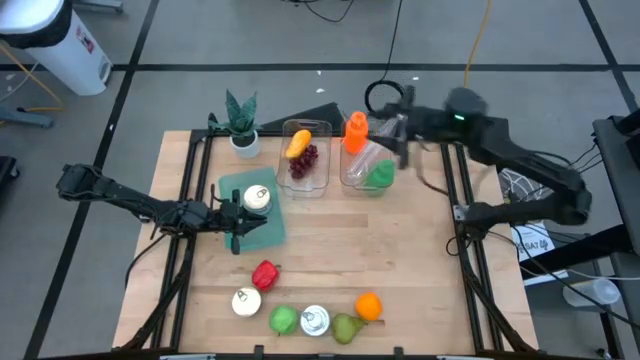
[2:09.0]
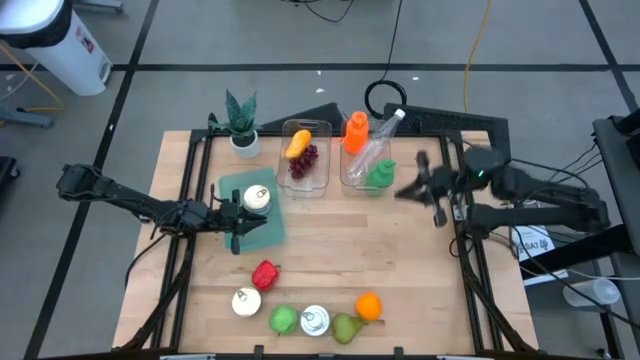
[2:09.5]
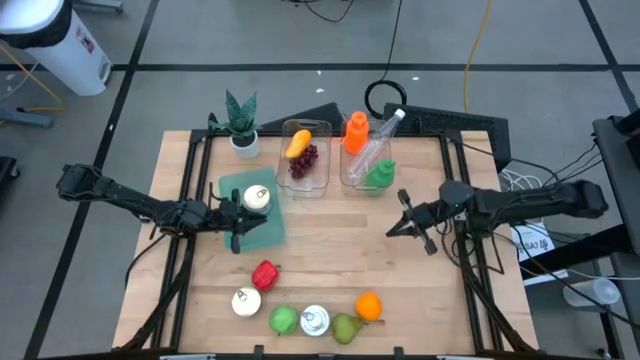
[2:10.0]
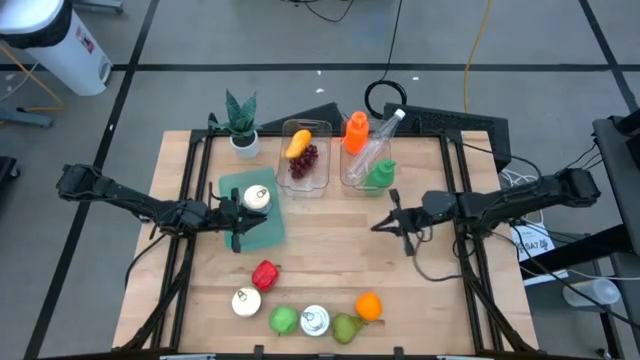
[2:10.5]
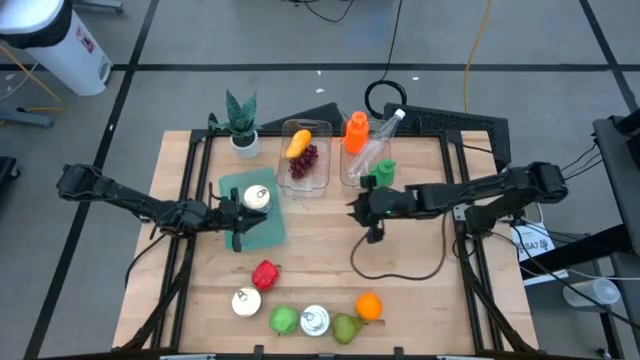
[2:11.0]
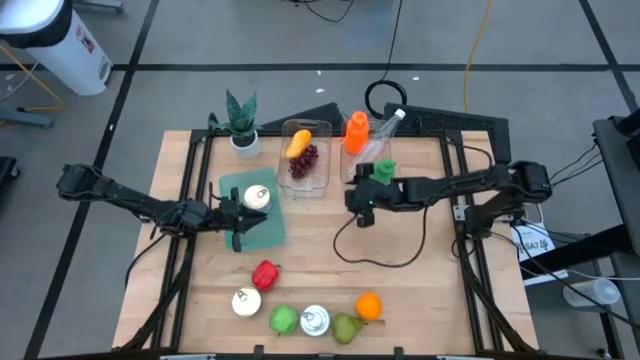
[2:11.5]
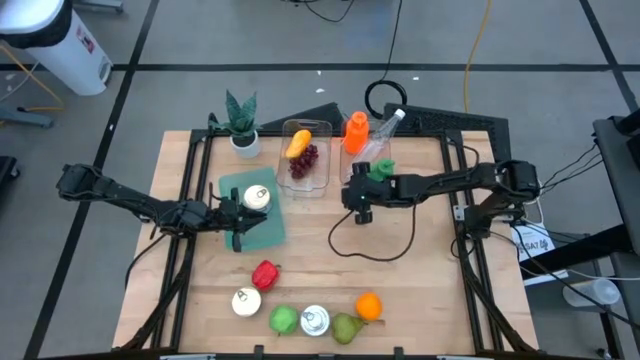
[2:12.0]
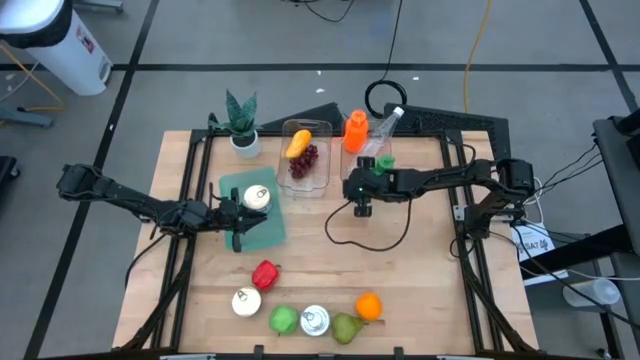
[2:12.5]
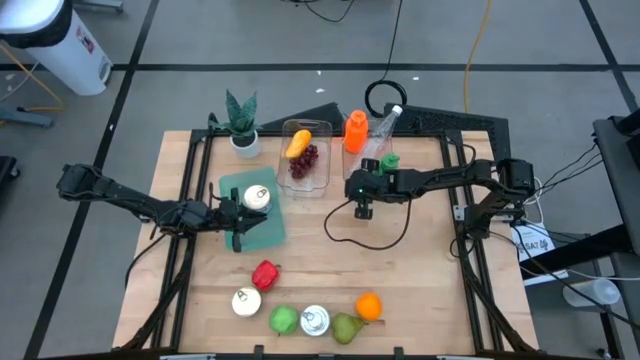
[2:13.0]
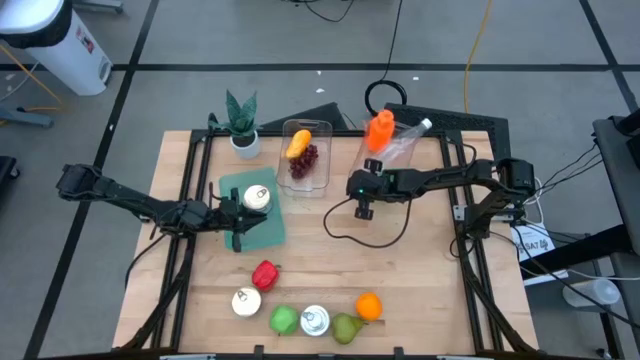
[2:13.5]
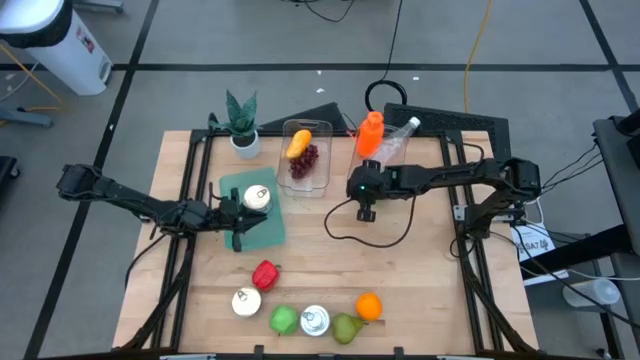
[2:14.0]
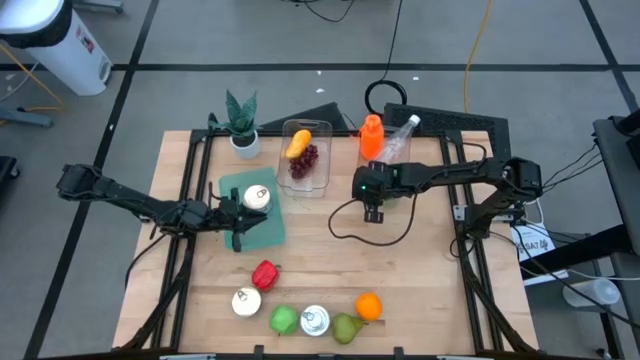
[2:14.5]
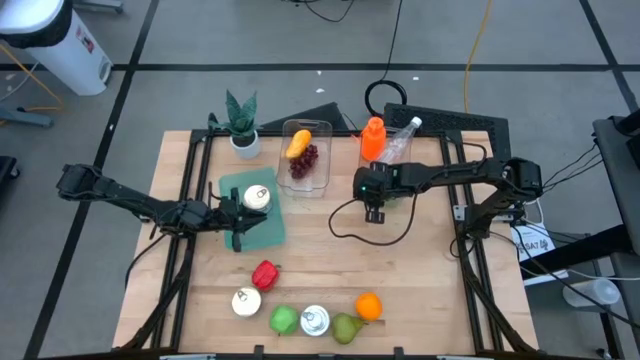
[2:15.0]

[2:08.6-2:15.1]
Task: Pick & Place Food Item
Adjust the right transparent bin on the table

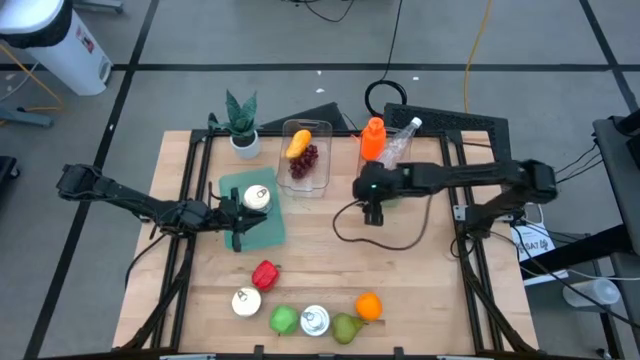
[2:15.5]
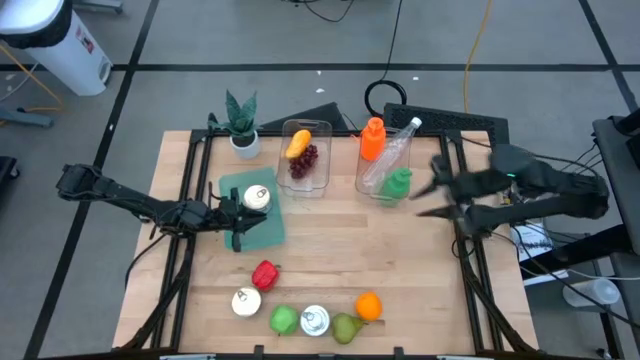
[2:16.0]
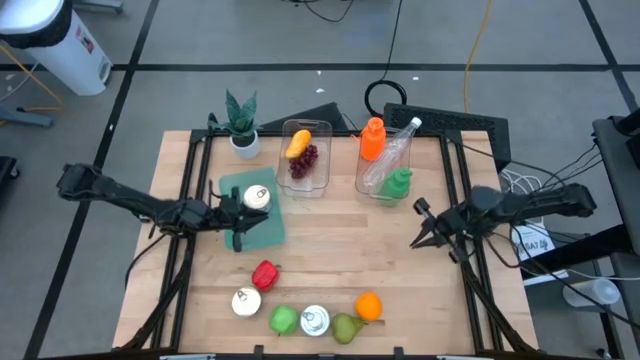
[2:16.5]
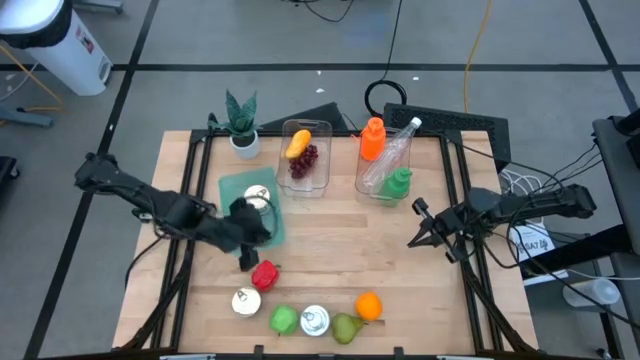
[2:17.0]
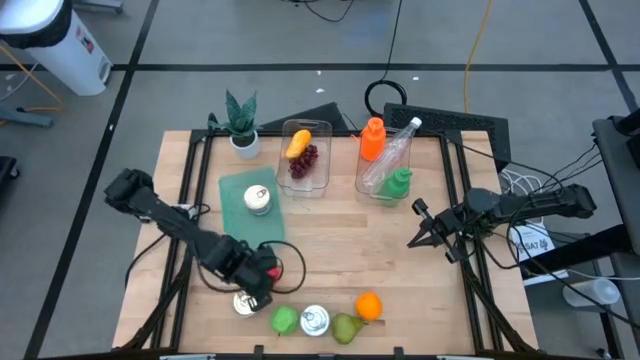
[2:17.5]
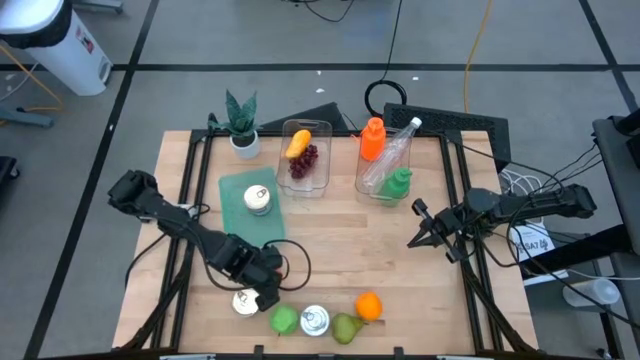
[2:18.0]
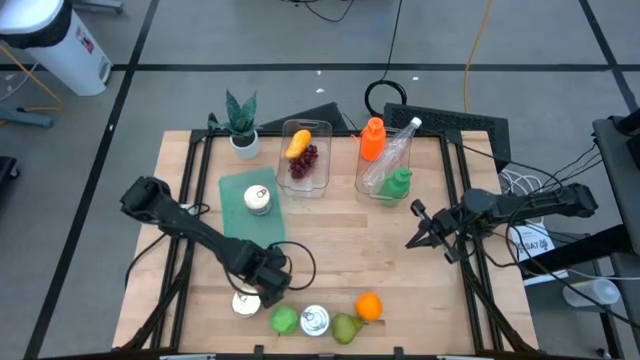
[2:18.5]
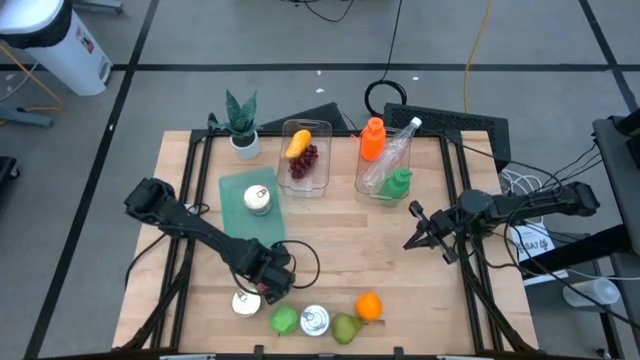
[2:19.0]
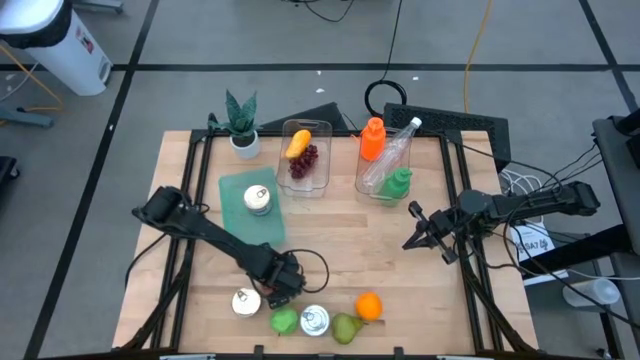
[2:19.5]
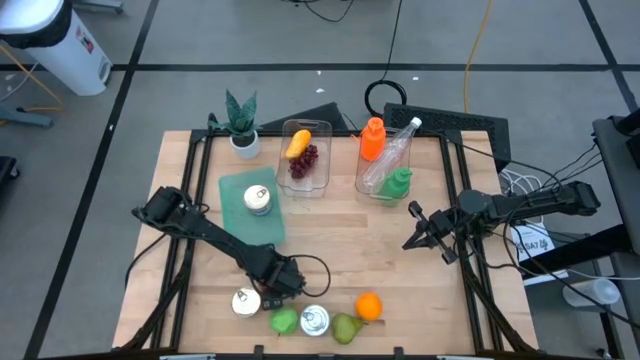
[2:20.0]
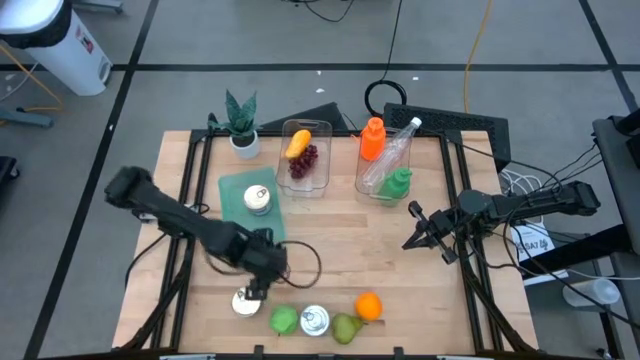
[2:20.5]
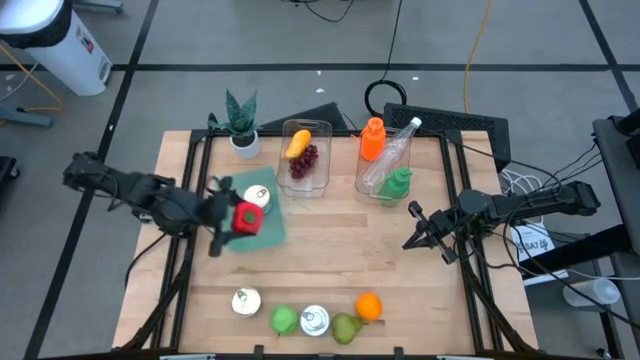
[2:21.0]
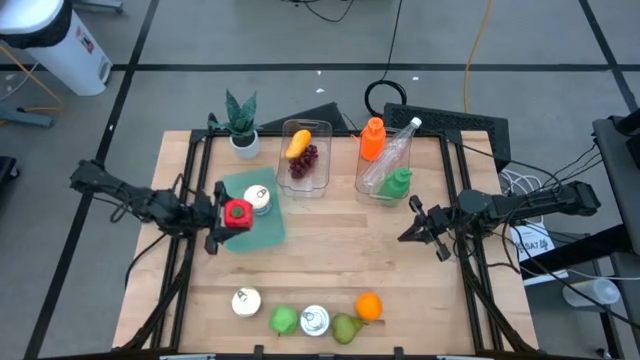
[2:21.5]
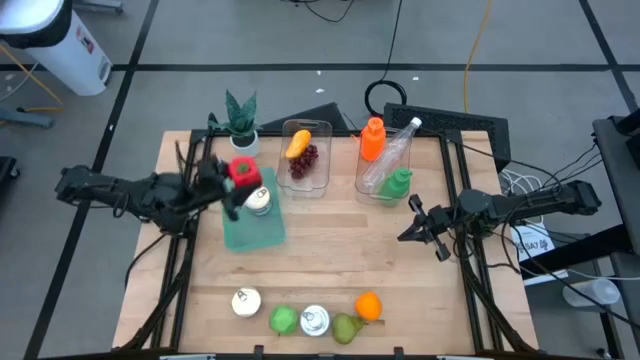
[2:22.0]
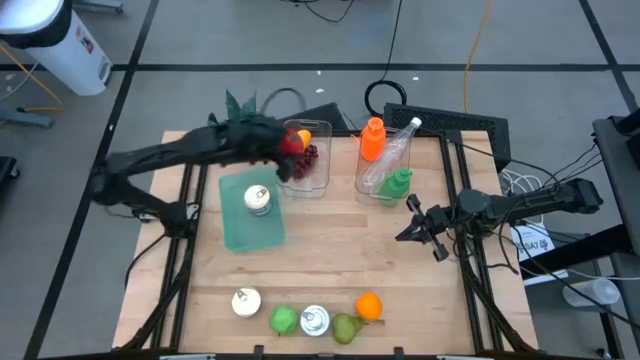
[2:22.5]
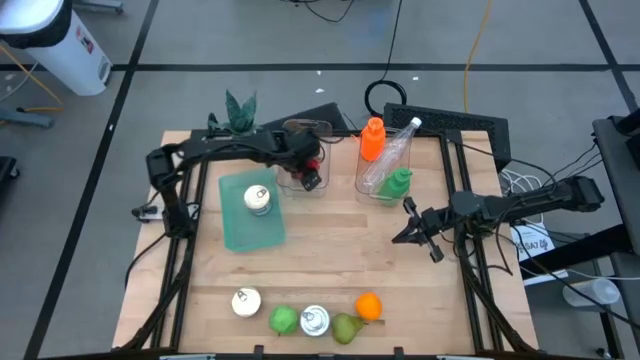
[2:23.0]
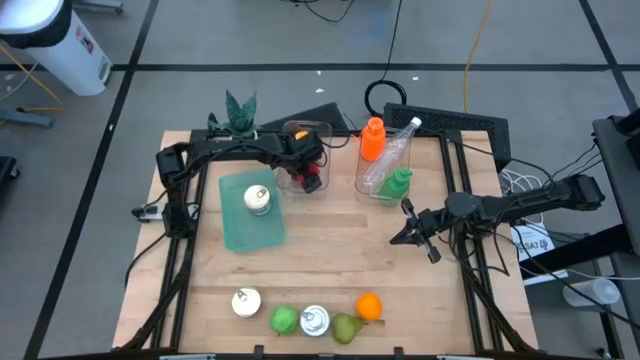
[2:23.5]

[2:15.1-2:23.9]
Put the red chili pepper into the left transparent bin

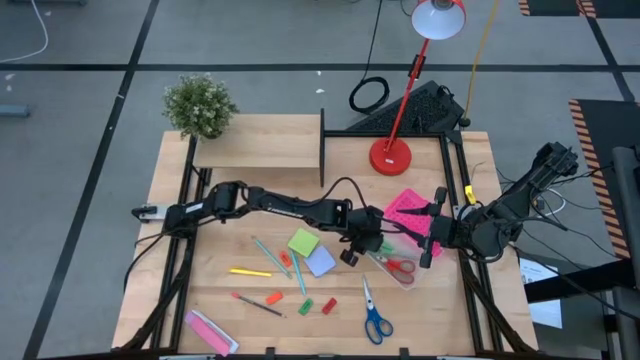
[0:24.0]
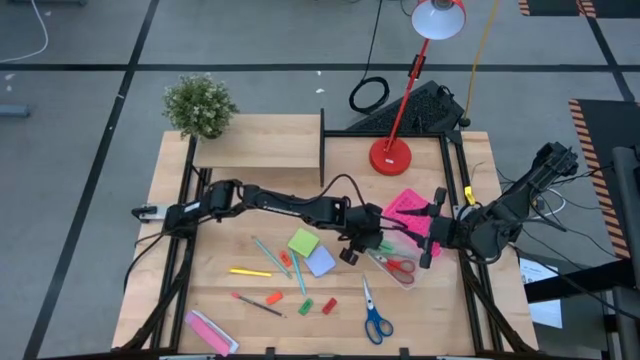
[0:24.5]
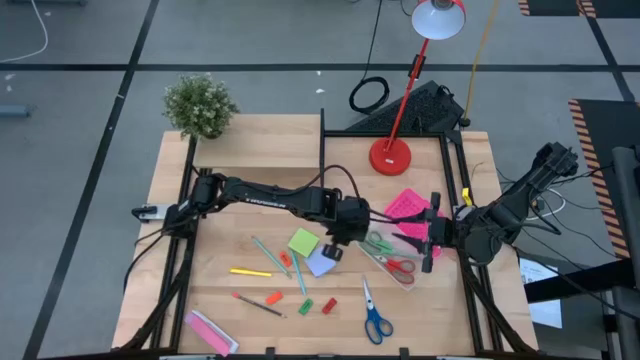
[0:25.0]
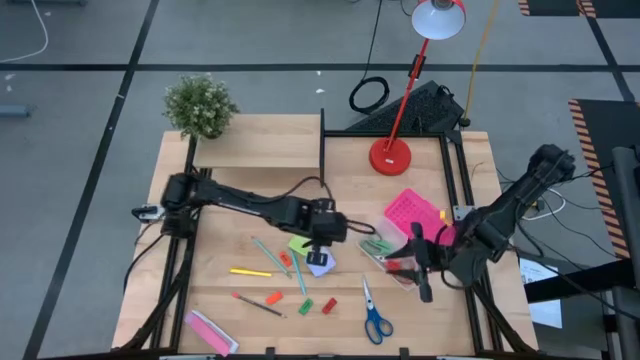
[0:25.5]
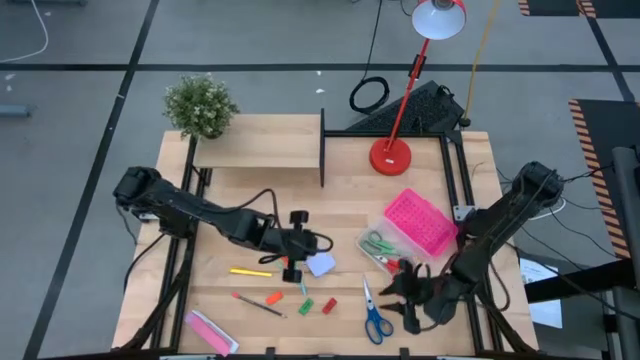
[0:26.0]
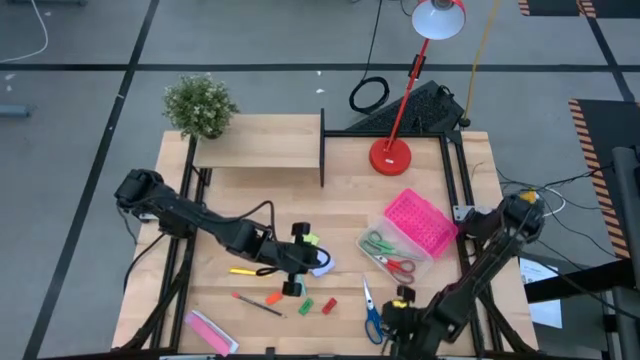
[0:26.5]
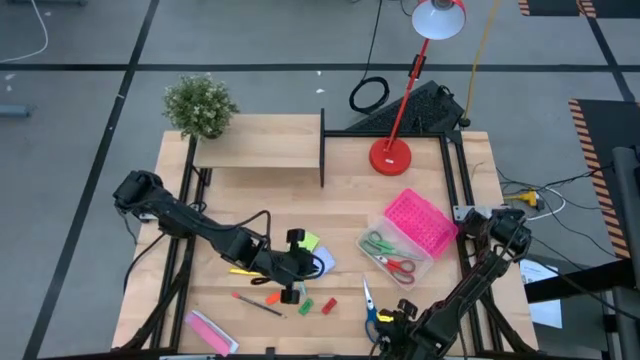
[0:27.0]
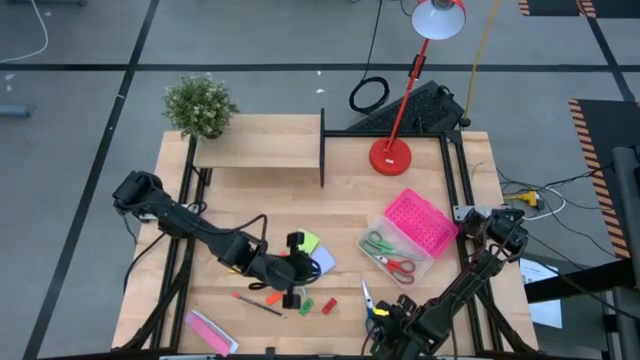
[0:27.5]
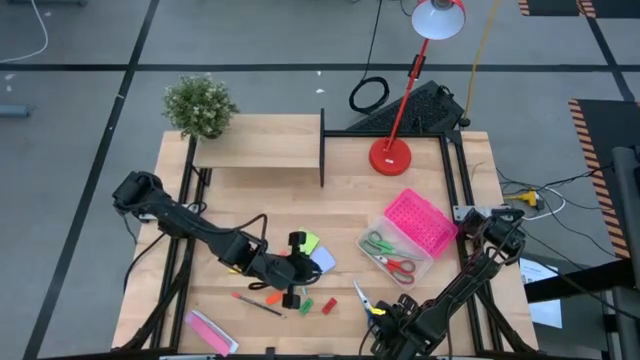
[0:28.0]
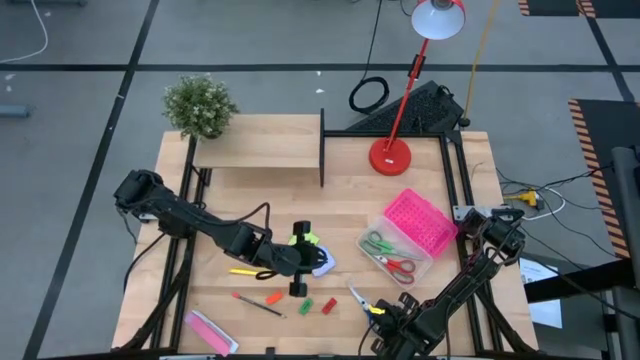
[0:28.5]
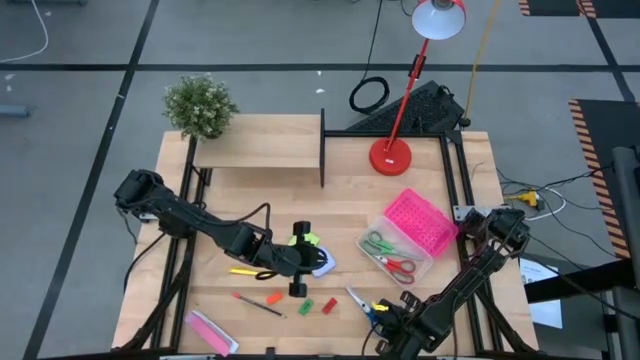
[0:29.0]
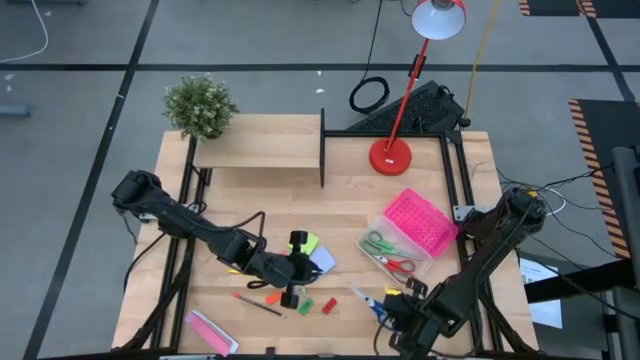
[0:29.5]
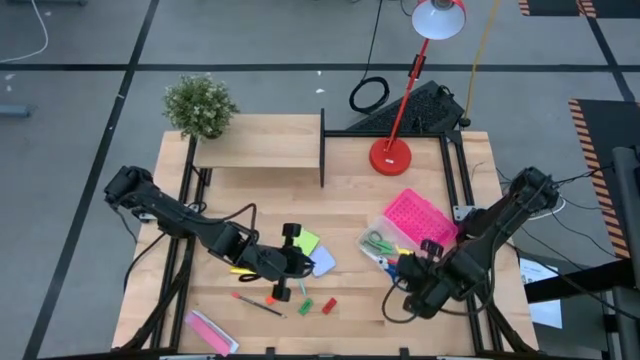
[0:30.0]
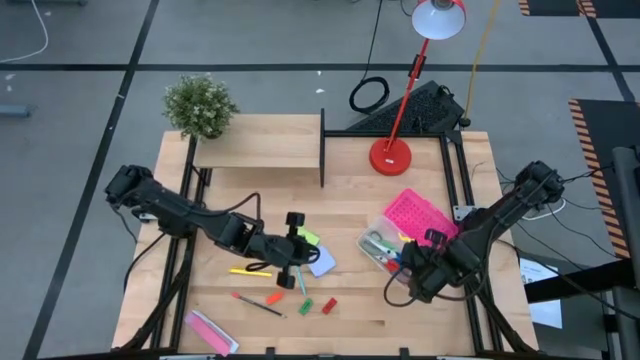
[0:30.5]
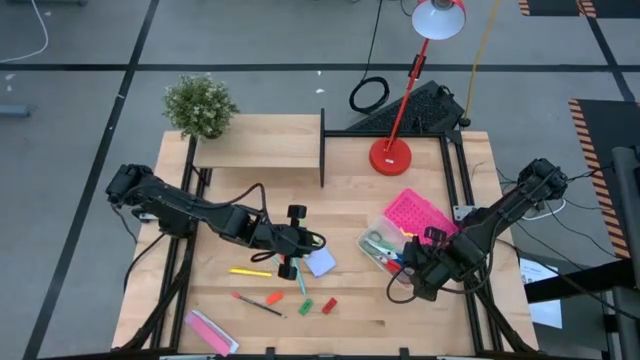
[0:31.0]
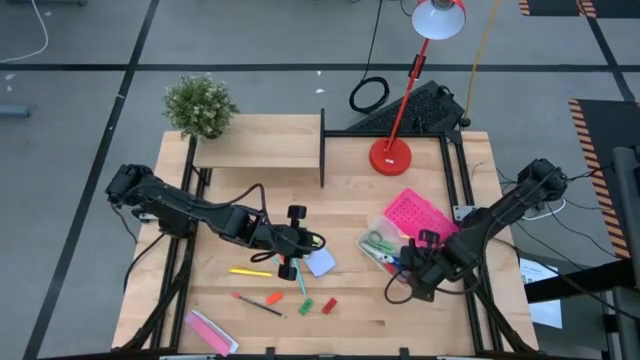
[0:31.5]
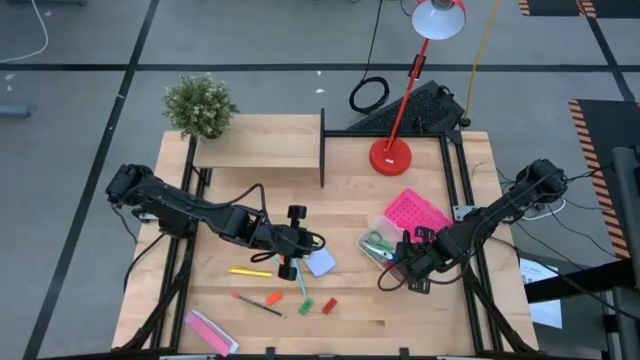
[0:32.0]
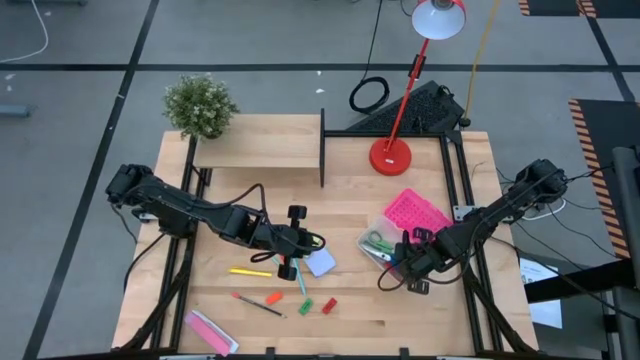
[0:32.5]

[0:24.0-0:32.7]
Task: Pack school essentials
Put the blue scissors into the pink supply box
